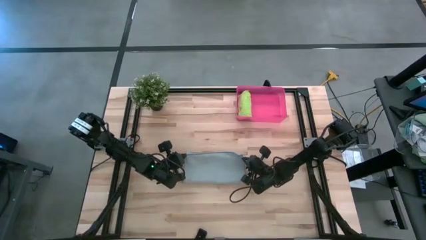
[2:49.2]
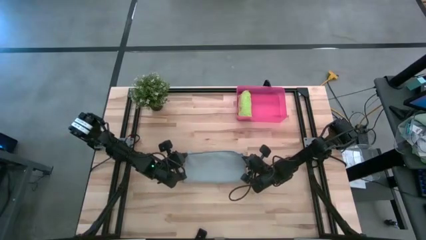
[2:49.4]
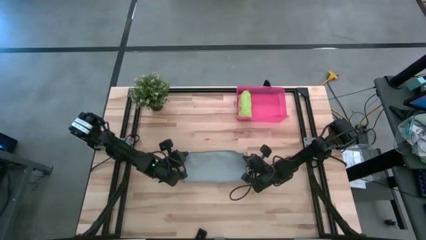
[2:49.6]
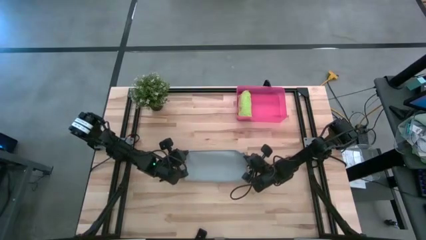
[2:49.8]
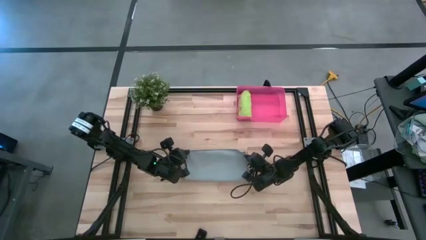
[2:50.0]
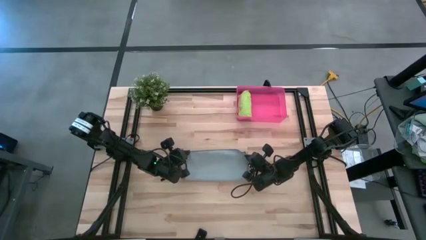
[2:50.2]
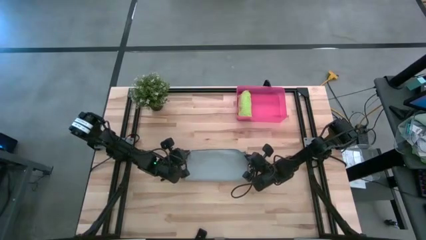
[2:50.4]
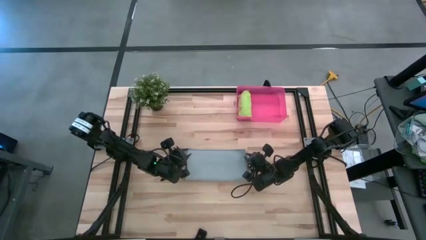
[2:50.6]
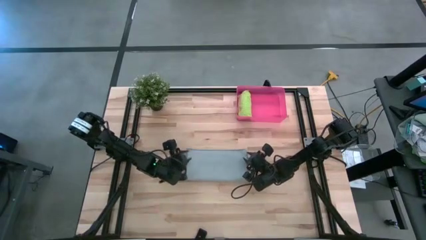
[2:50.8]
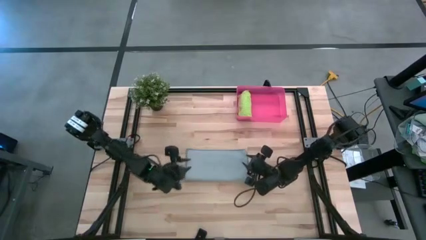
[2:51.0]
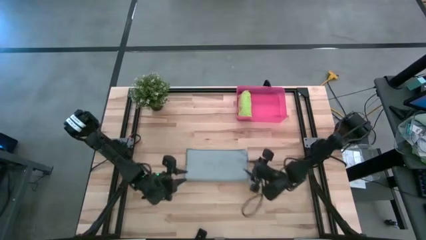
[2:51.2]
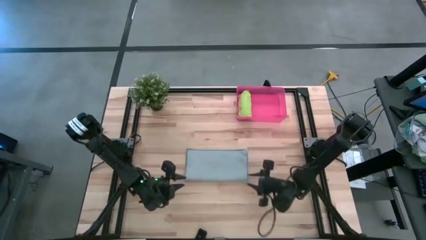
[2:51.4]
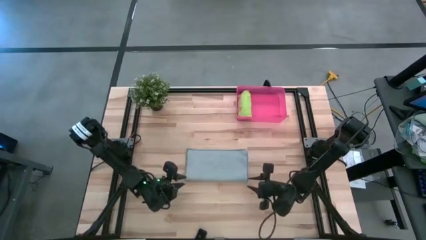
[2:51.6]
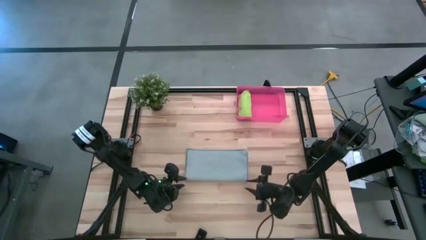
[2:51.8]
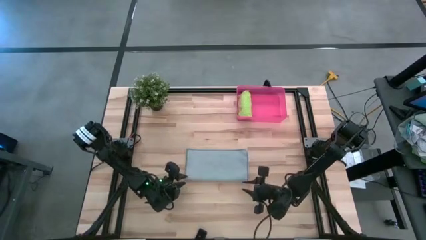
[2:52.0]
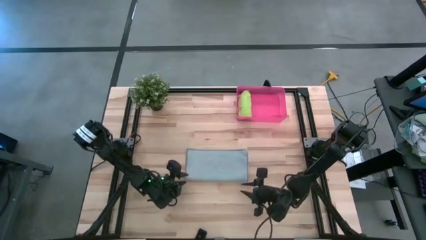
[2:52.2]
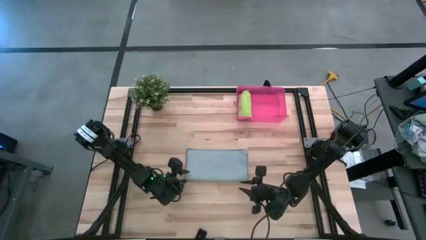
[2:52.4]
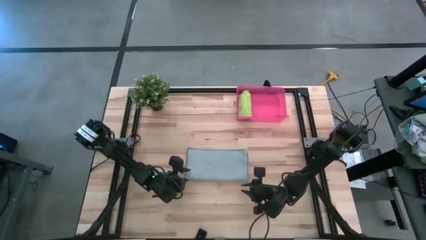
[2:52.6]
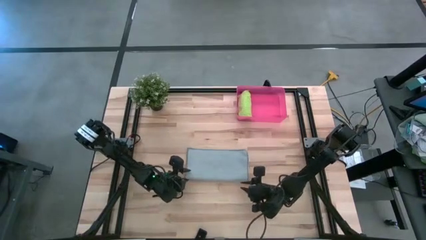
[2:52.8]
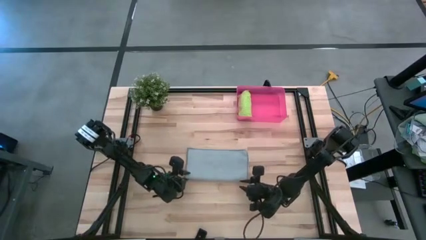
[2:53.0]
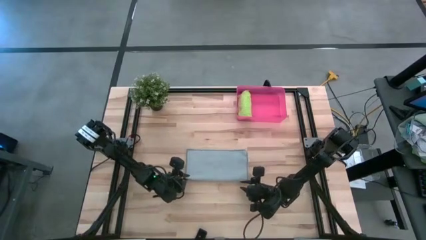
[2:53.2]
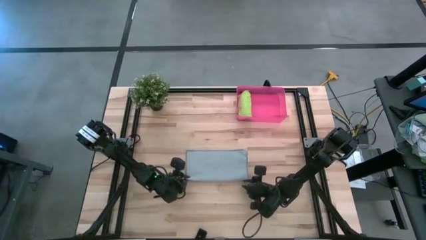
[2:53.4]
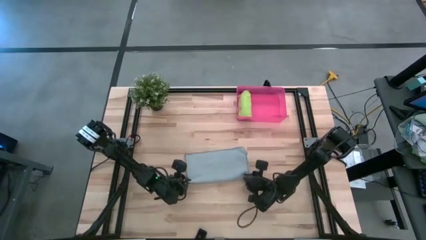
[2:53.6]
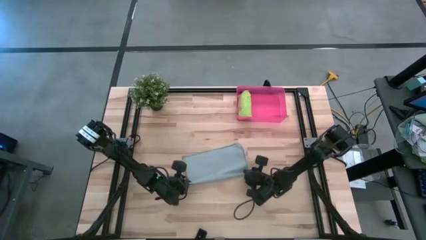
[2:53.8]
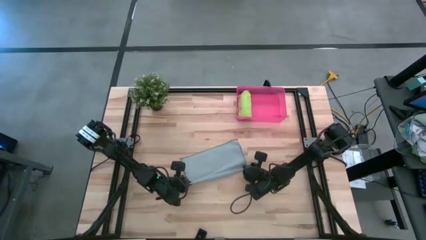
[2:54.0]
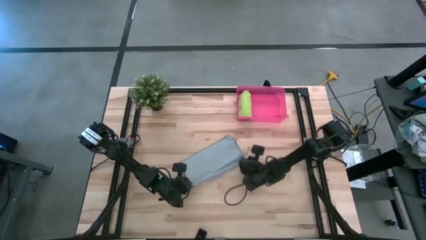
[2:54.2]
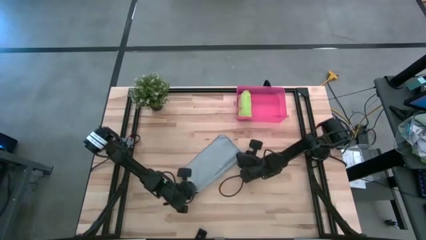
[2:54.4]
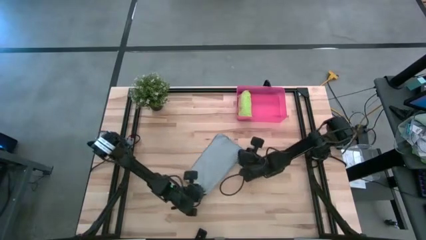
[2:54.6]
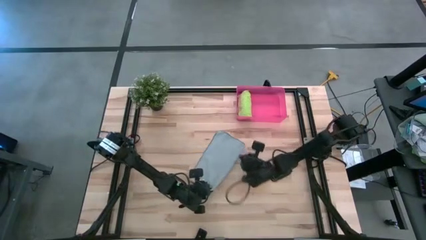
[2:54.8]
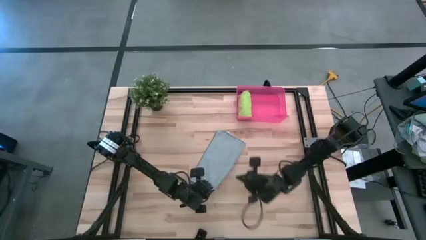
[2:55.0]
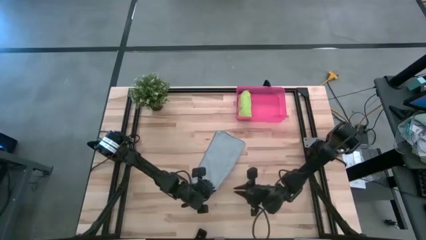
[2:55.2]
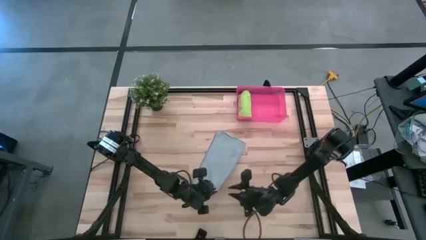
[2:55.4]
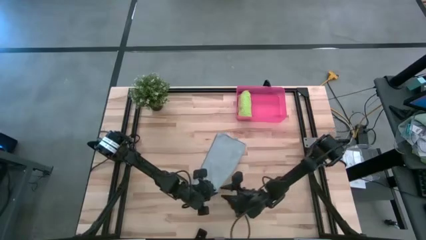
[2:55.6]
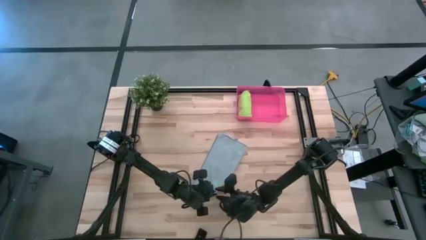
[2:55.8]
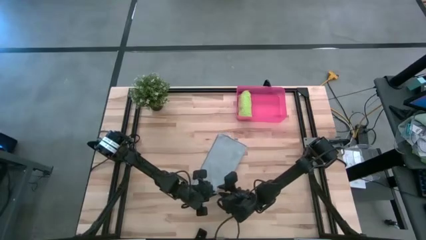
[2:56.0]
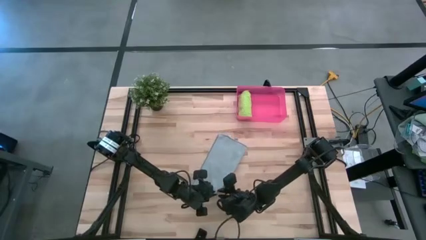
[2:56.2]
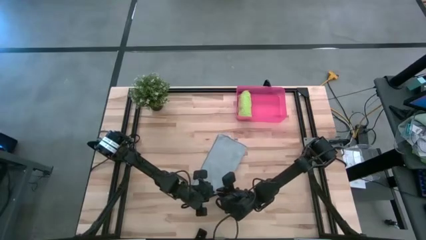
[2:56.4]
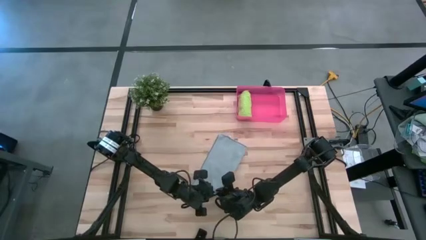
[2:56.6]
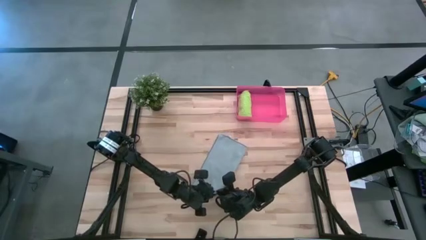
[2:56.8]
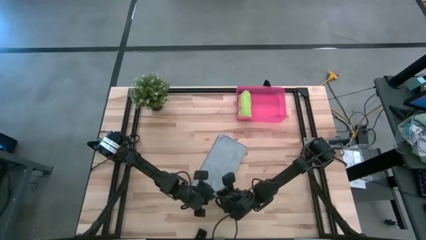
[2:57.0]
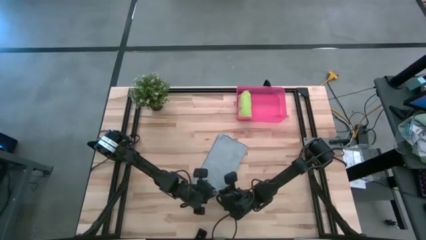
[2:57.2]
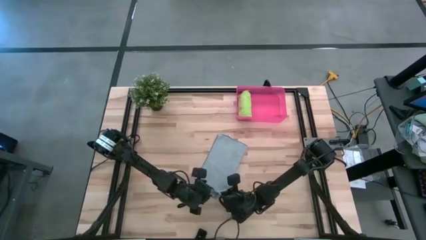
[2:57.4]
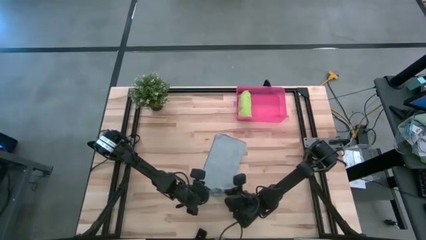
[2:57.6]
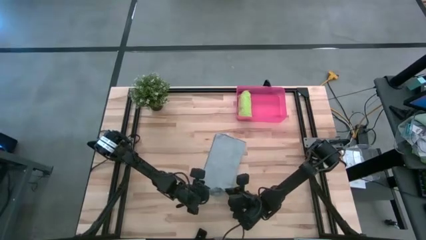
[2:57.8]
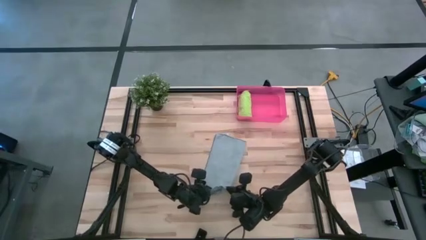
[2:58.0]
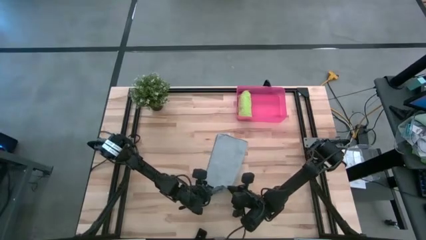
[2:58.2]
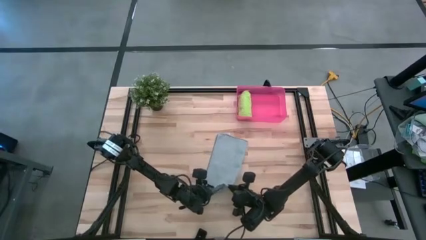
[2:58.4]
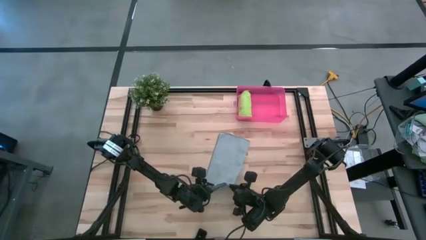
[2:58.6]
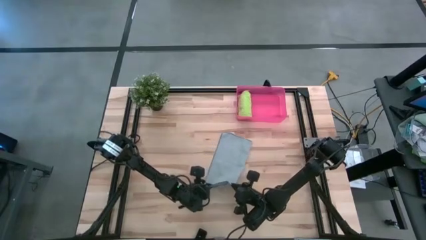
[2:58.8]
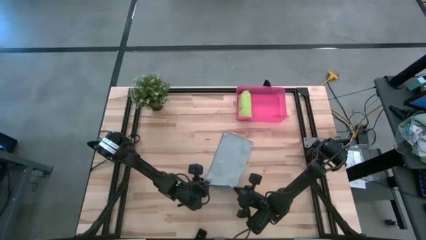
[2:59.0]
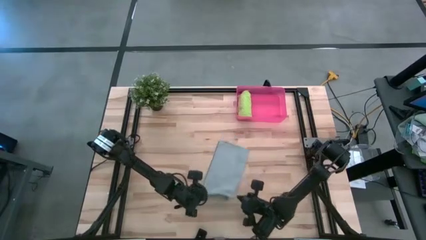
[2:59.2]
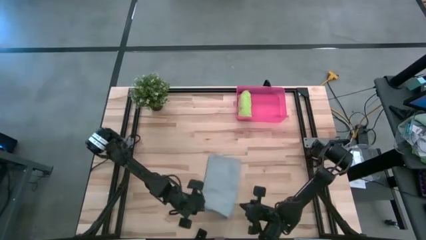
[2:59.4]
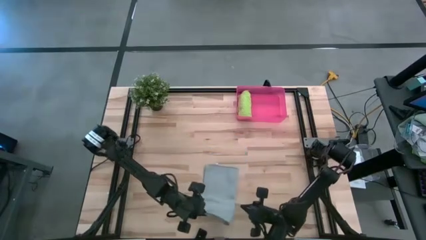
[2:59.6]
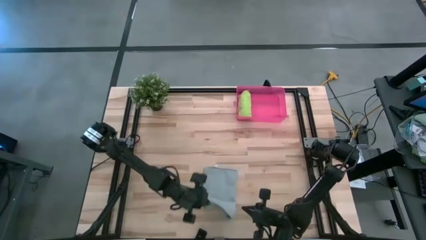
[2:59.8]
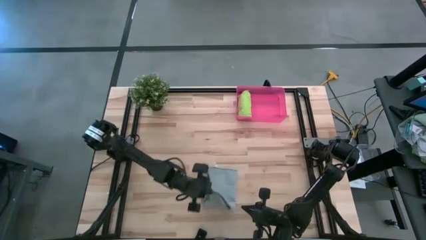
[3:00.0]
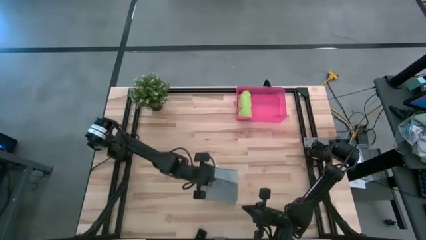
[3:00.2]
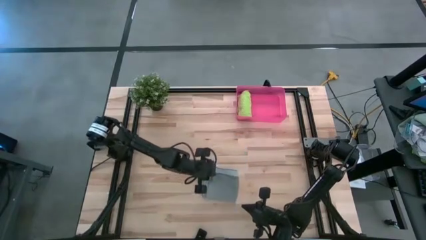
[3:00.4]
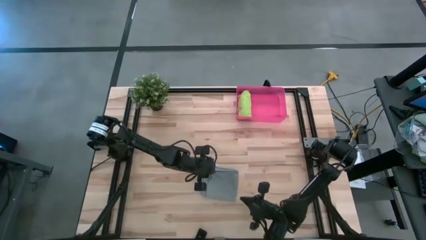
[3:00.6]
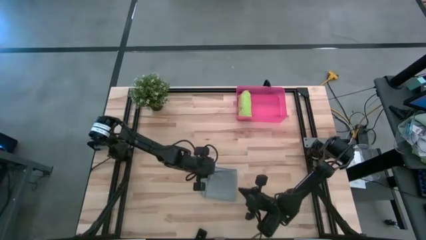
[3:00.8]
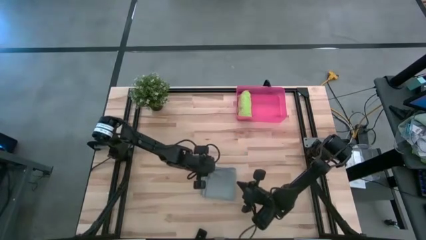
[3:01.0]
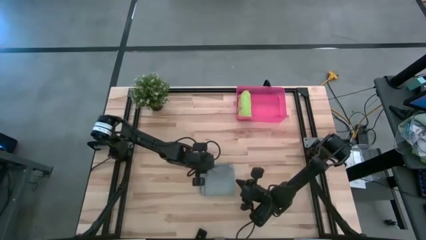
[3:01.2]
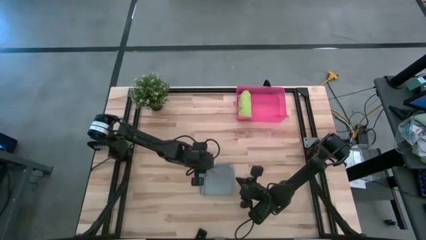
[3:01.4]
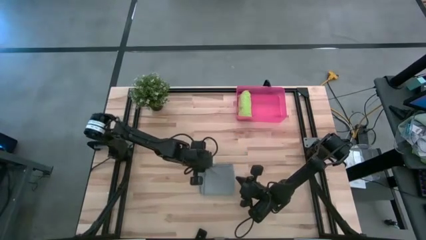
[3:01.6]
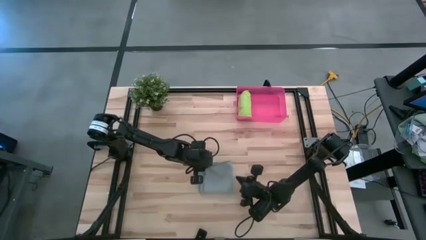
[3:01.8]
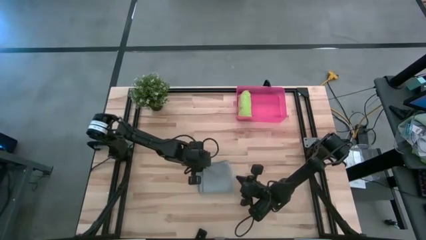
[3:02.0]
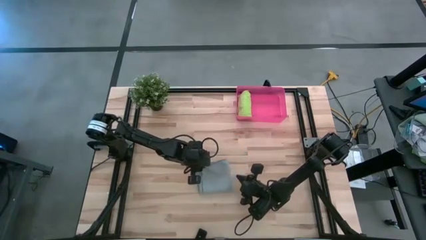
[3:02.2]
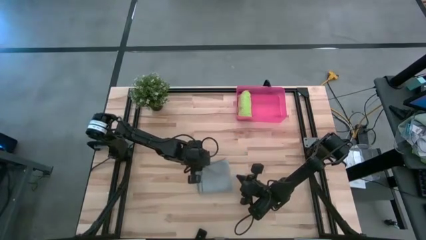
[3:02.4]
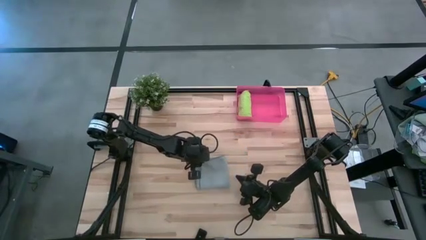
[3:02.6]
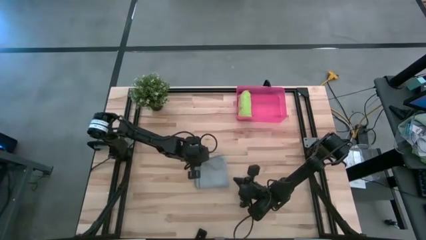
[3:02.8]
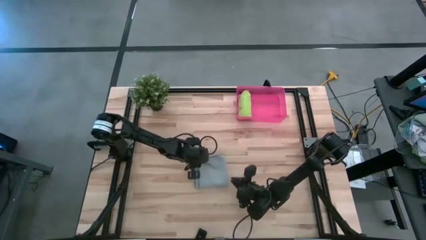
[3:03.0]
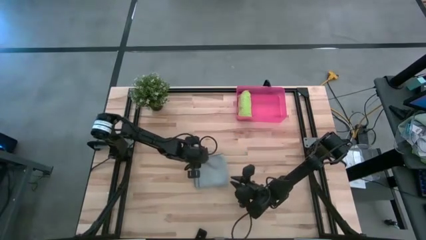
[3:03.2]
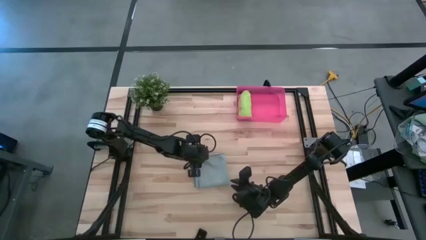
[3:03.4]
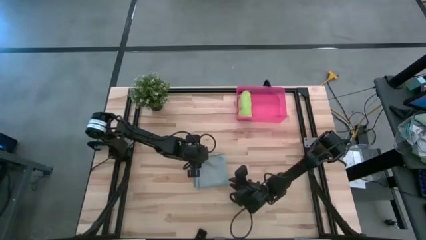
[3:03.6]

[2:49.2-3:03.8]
Task: Roll microfiber towels into tight, uniform cylinder then place into a basket
Fold the gray microfiber cloth
